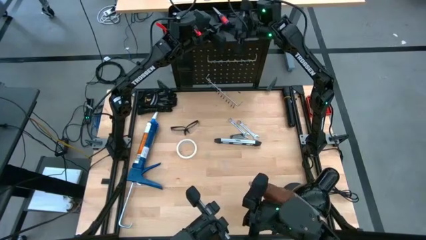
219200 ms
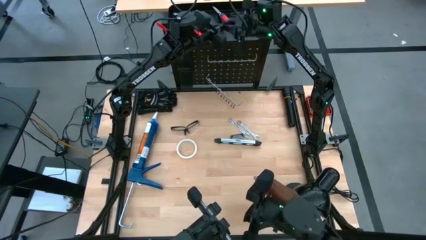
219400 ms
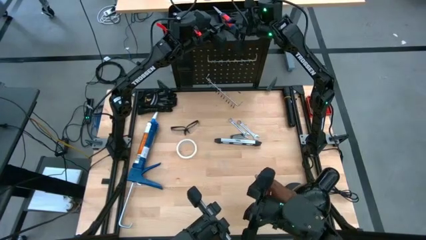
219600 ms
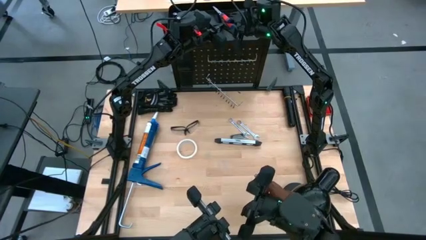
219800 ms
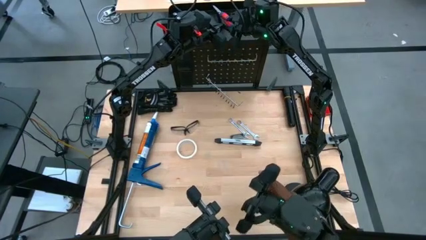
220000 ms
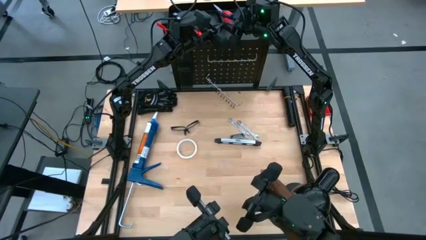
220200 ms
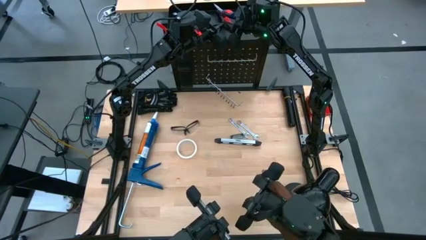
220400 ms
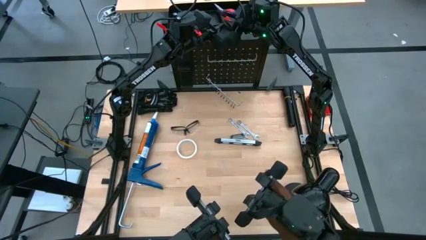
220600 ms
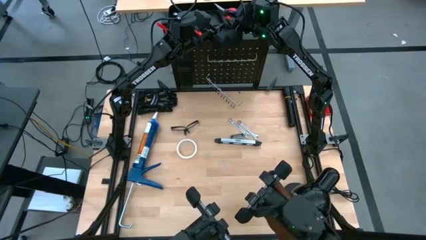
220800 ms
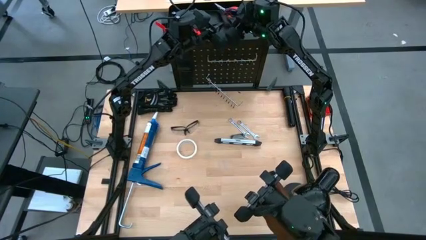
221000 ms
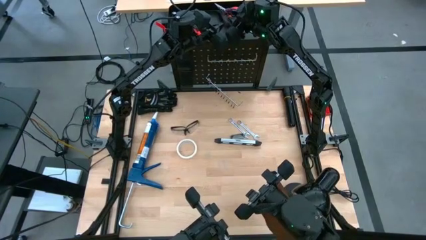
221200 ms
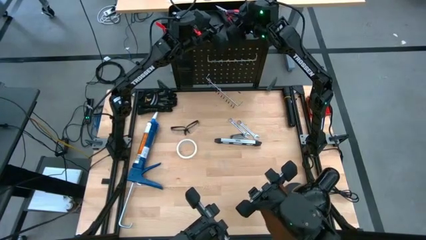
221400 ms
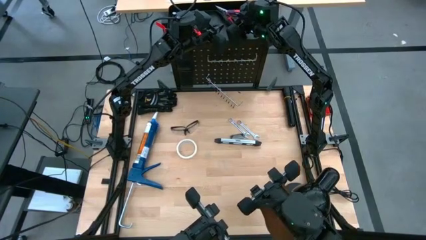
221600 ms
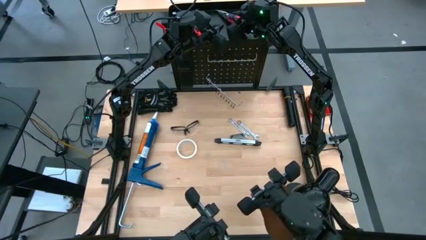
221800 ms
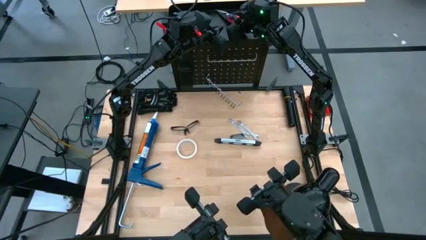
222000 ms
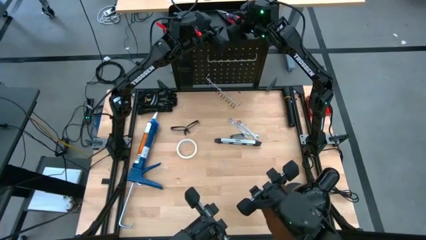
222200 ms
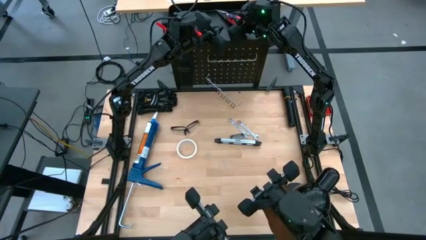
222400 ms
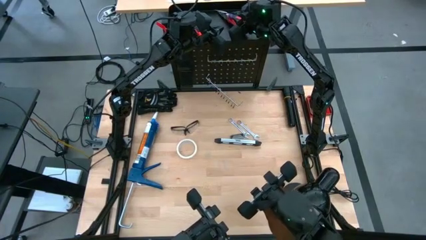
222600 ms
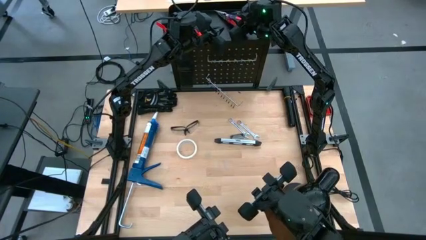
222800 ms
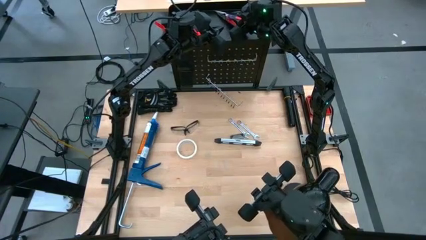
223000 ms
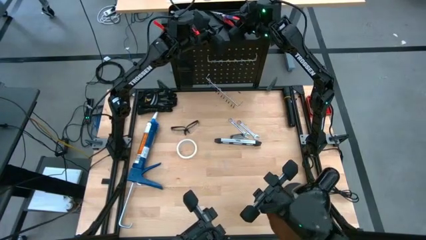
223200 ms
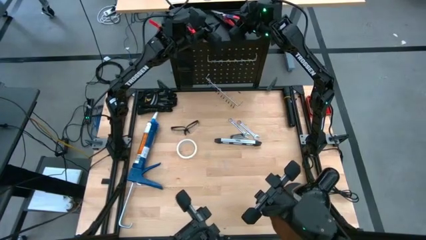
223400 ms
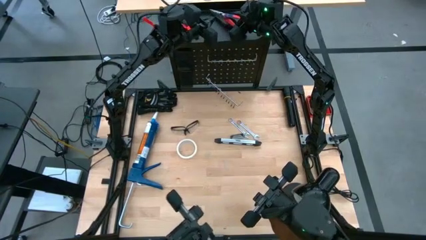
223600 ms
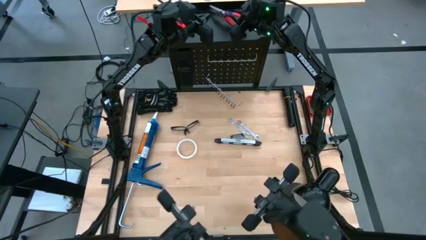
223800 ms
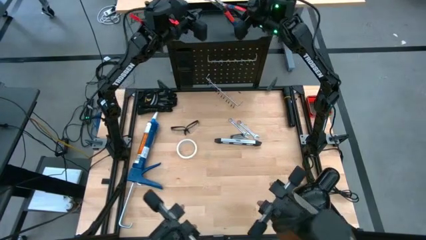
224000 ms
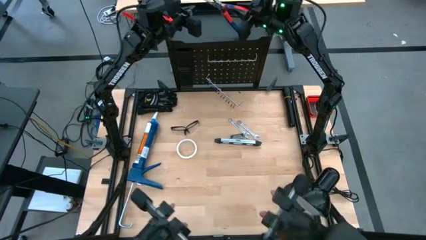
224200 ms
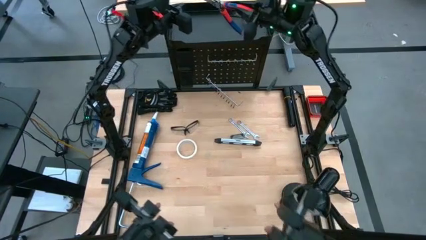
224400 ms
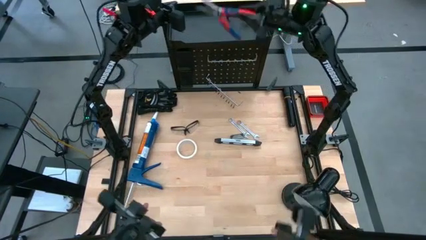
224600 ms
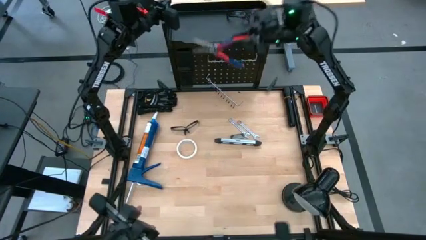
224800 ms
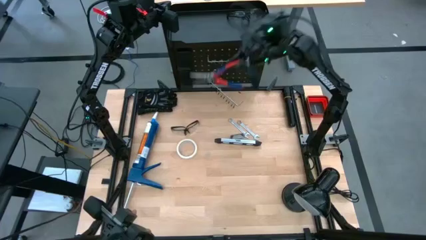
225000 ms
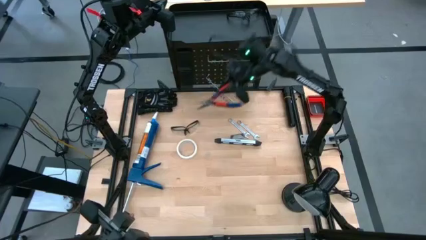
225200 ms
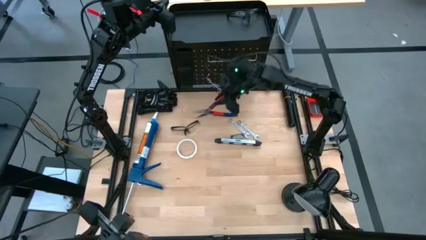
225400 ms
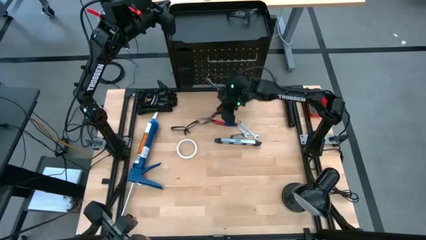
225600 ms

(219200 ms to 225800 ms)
Task: Hang tools onto peg board
Remove the pliers from the peg board bin

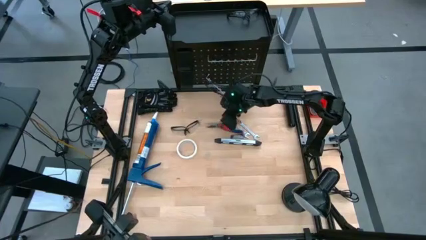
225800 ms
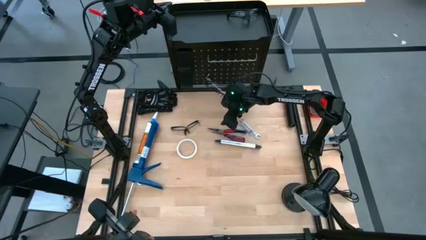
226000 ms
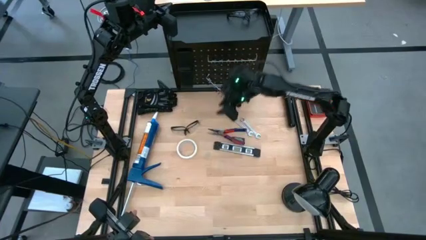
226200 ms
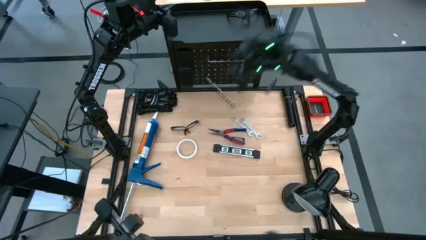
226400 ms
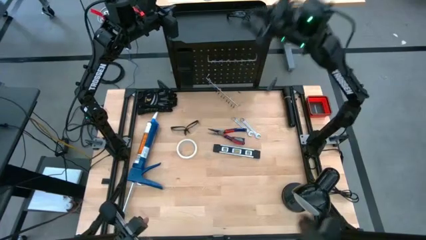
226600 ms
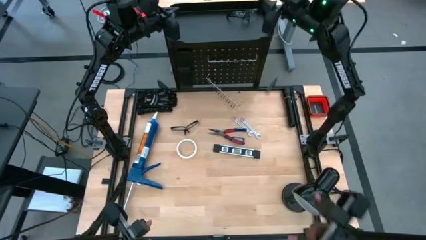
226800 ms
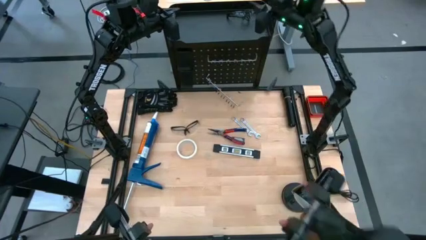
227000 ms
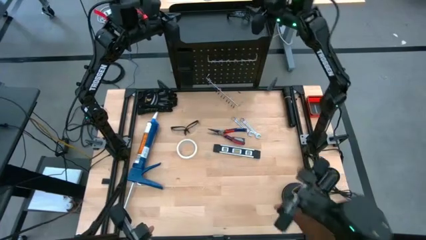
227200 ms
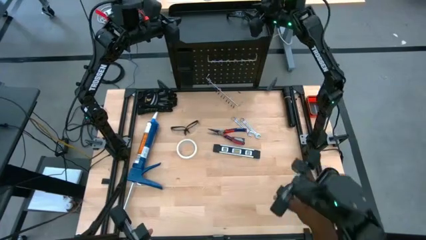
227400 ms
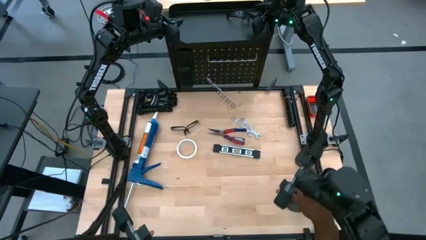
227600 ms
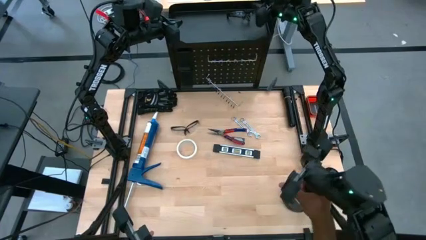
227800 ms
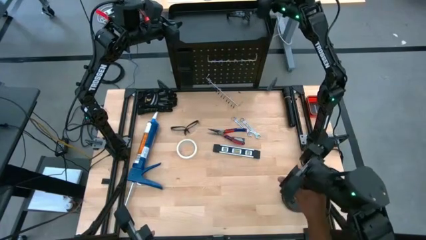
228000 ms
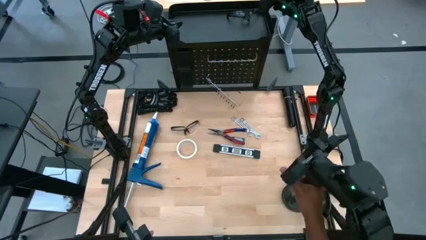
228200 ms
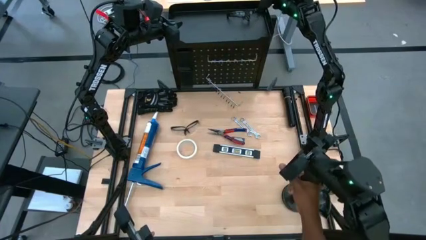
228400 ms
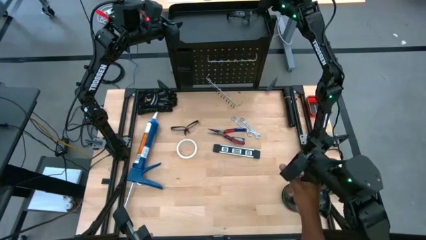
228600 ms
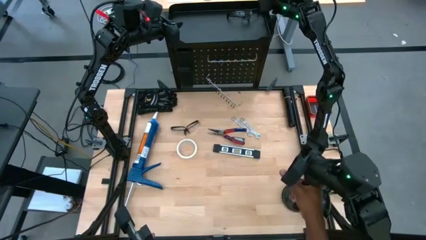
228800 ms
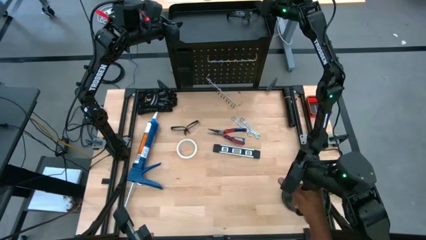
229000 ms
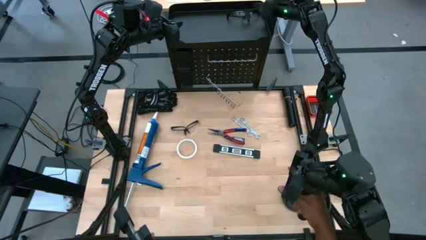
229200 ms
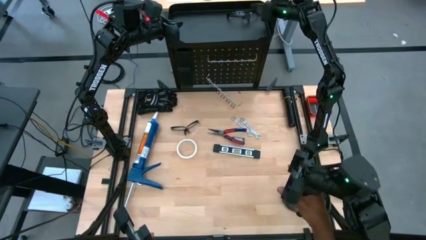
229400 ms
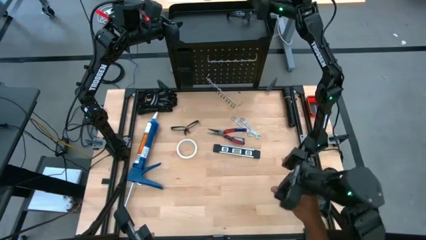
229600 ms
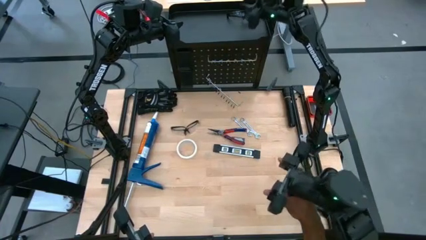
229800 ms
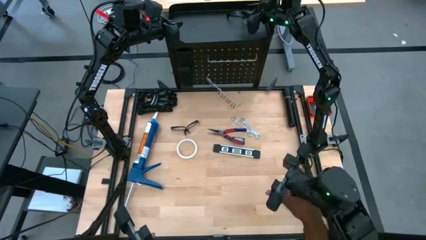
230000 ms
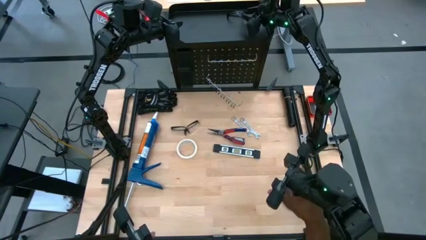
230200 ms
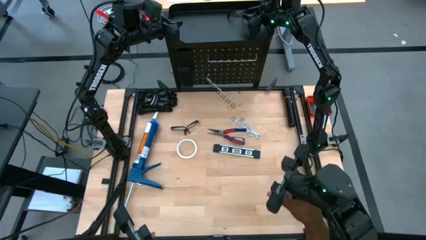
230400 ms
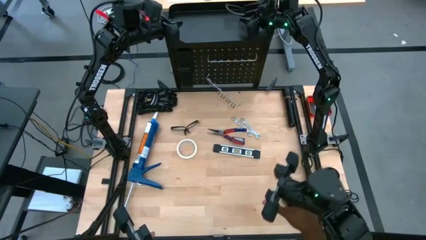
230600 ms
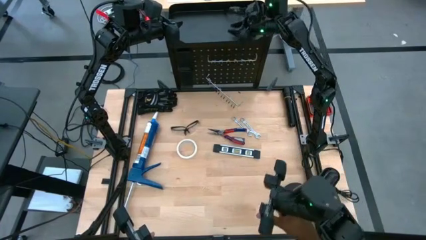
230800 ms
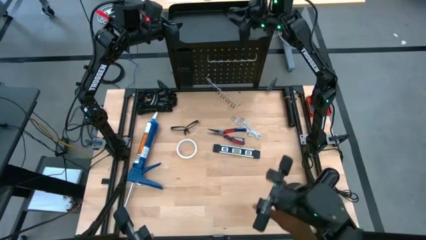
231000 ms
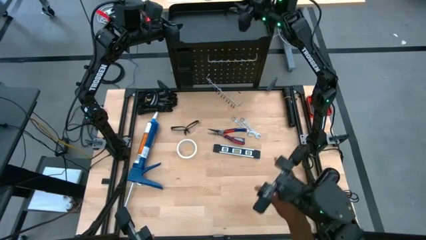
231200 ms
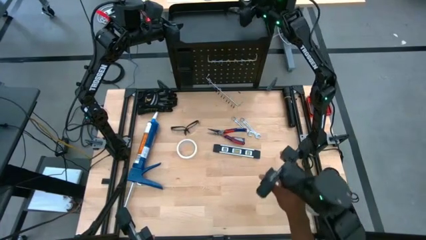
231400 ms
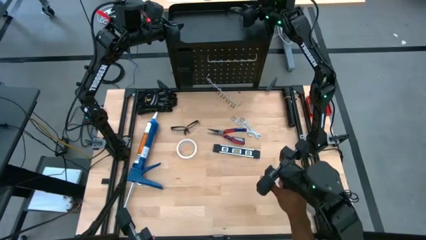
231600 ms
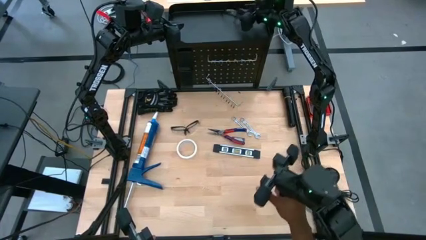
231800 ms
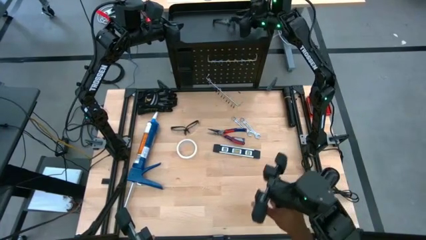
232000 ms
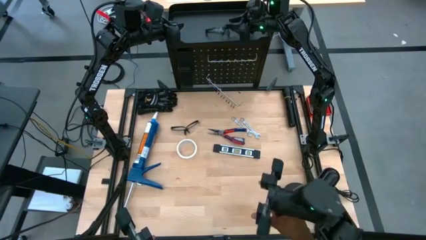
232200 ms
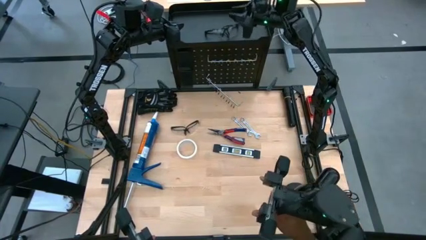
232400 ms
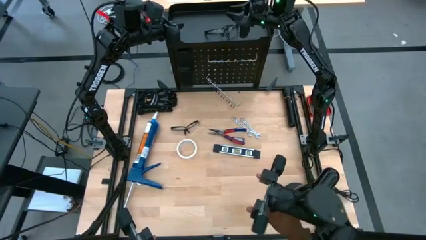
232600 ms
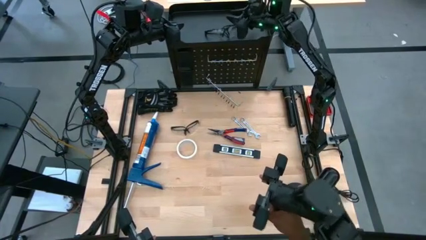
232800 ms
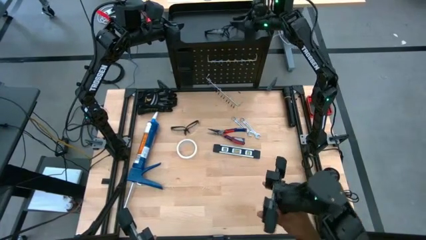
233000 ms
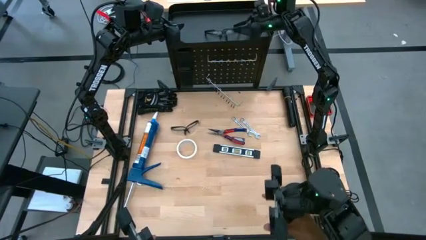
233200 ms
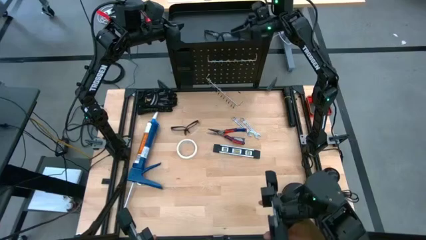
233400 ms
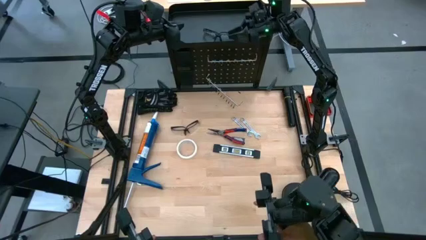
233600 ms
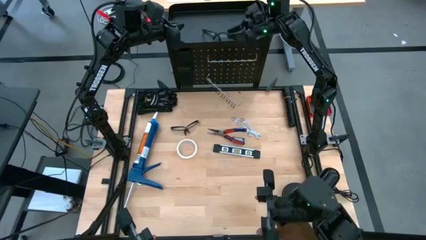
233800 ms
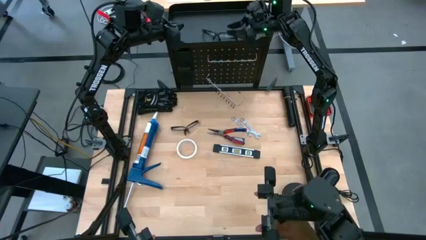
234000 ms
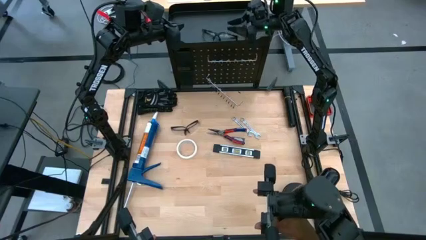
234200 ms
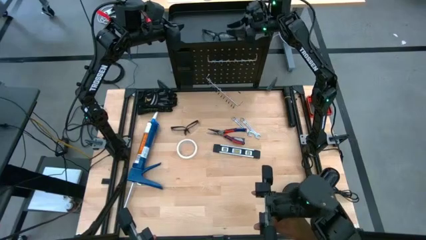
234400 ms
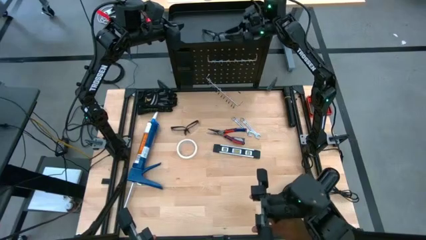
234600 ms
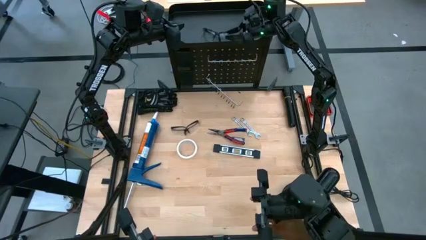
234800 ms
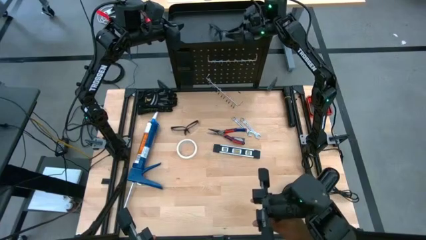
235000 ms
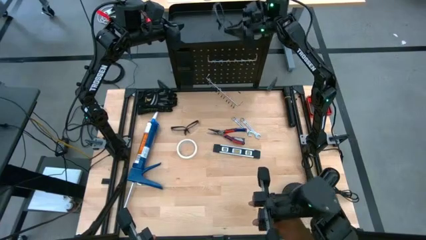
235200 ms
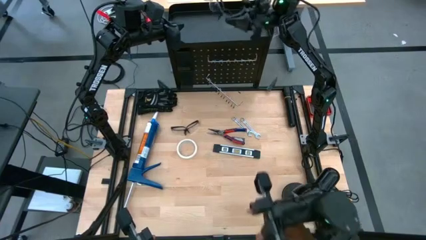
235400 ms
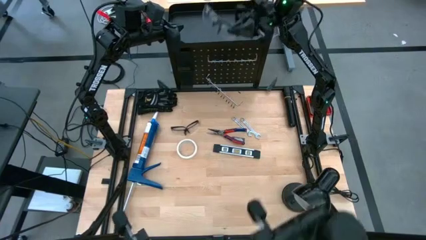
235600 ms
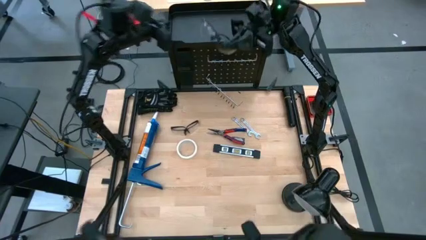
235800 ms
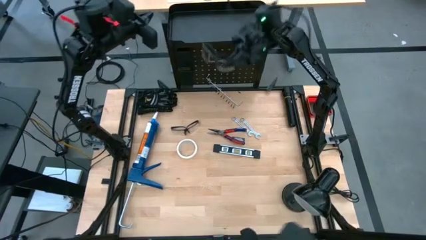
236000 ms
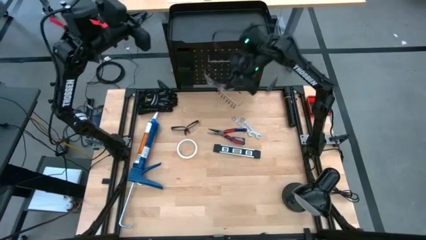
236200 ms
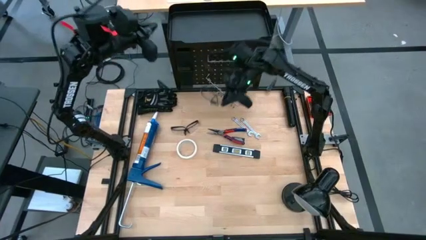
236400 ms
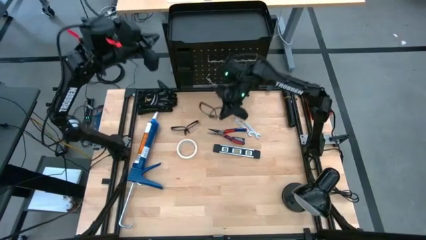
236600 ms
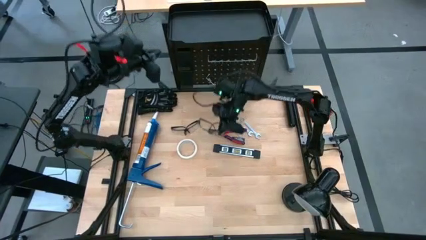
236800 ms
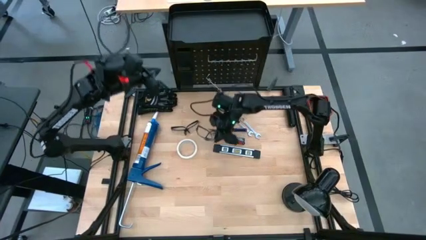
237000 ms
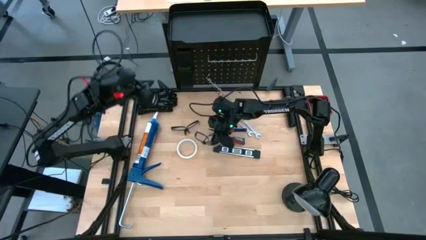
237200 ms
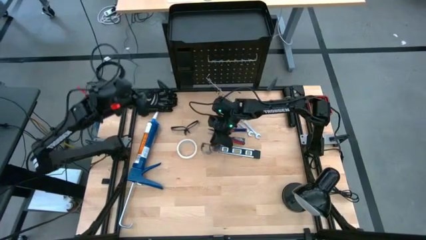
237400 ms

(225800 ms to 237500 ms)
Remove the safety goggles from the peg board bin
